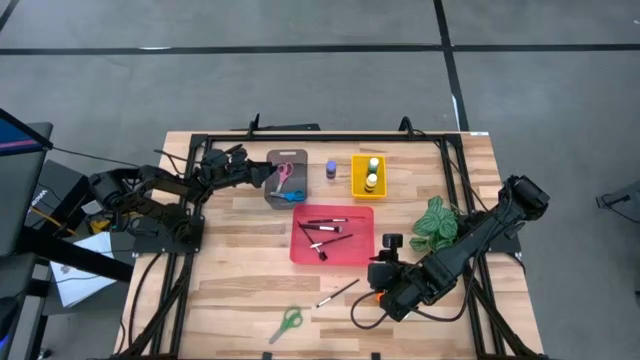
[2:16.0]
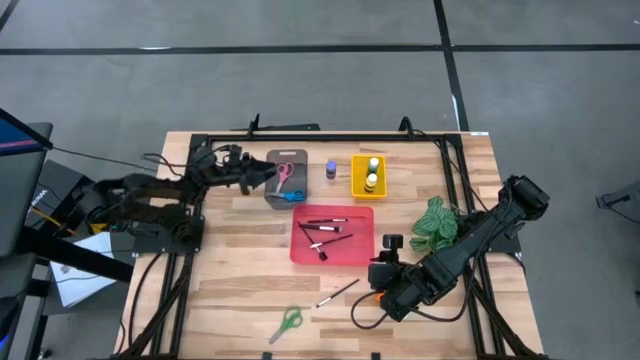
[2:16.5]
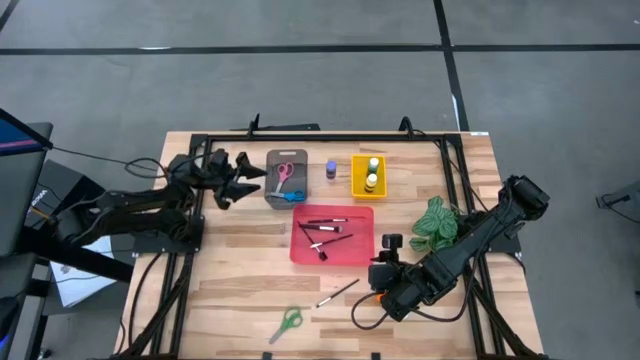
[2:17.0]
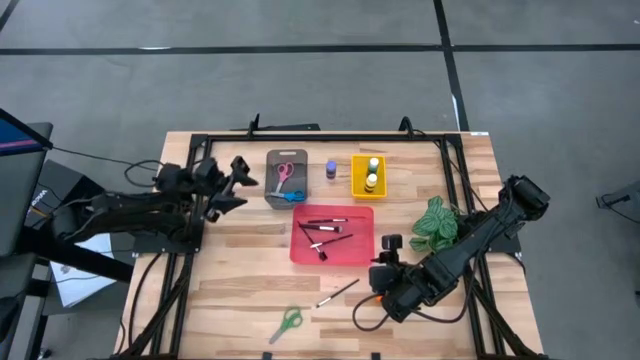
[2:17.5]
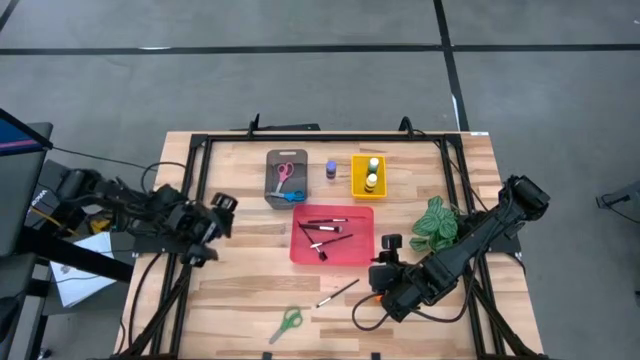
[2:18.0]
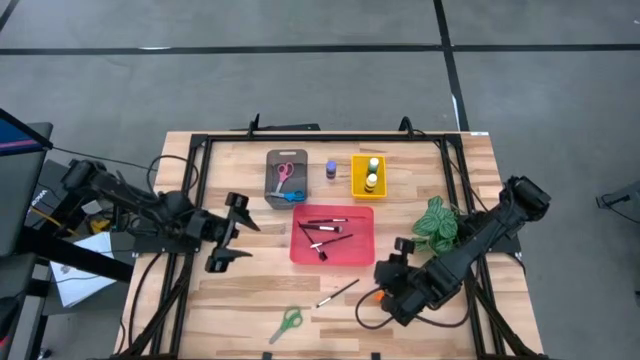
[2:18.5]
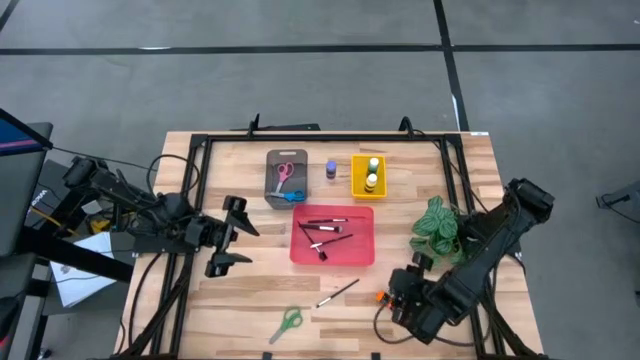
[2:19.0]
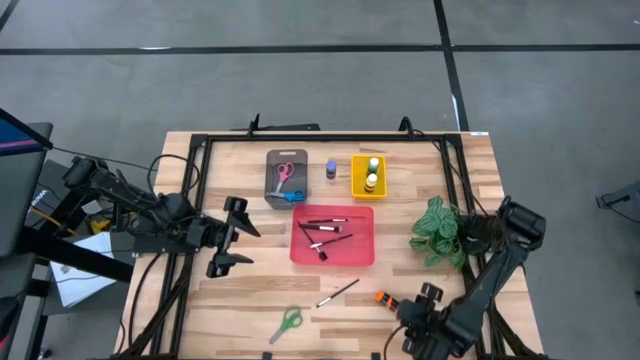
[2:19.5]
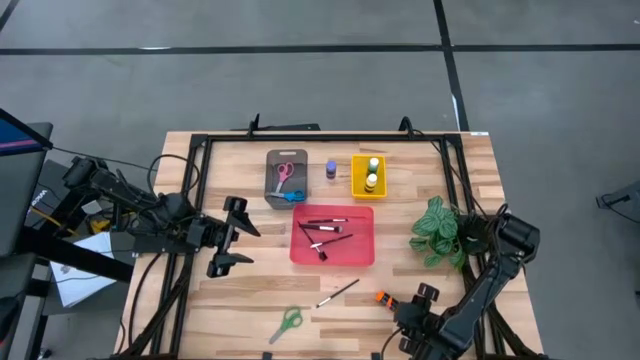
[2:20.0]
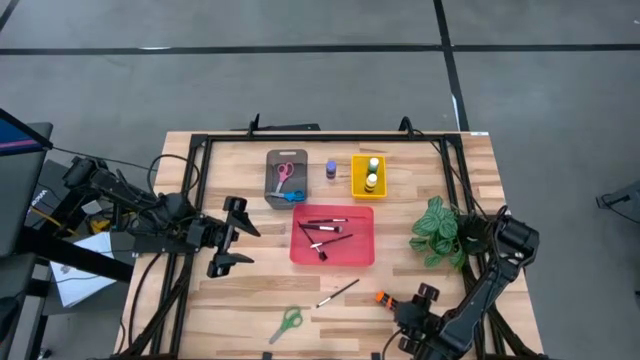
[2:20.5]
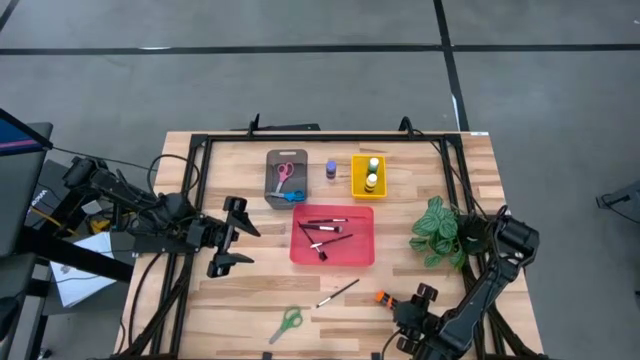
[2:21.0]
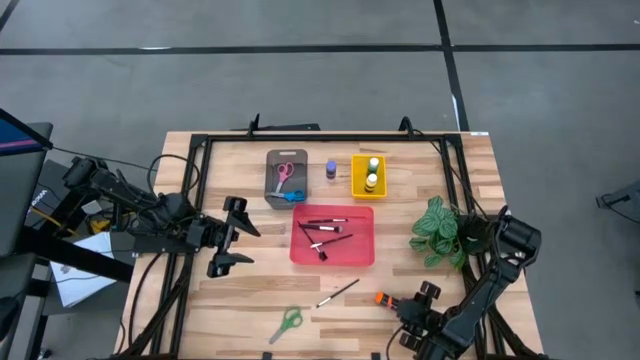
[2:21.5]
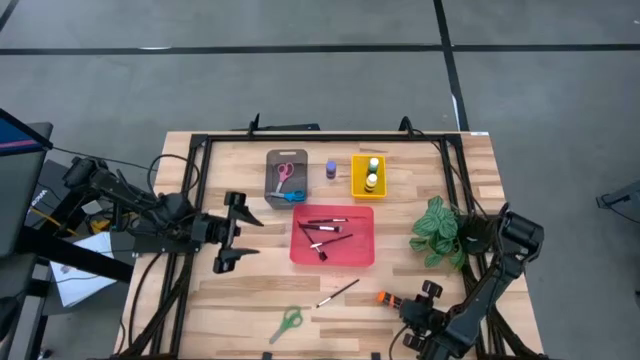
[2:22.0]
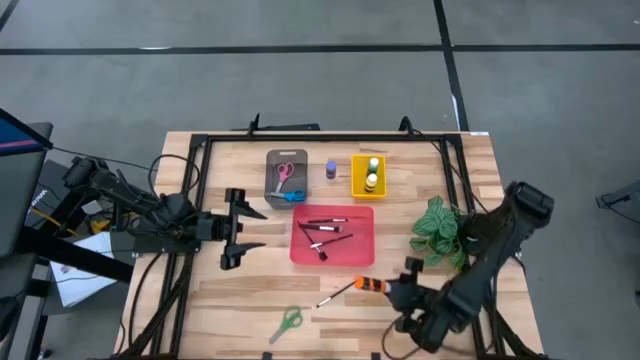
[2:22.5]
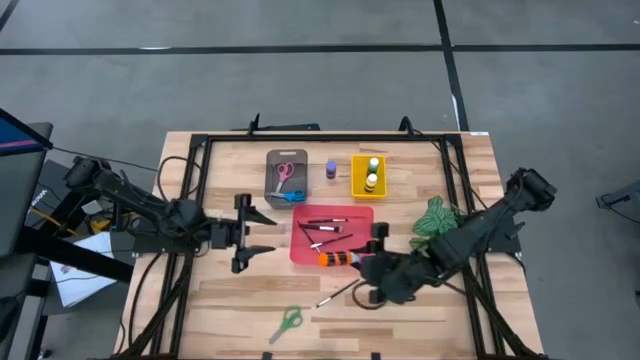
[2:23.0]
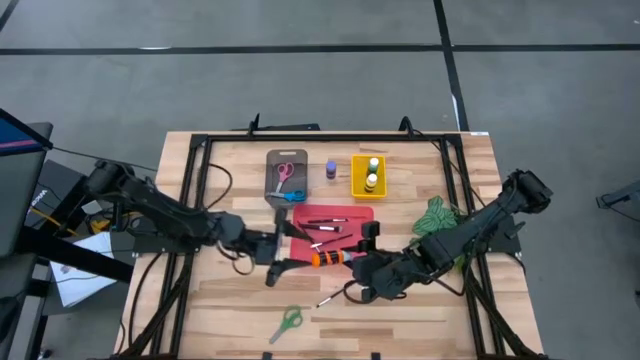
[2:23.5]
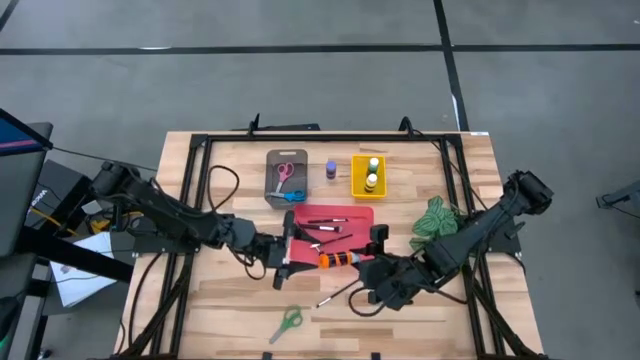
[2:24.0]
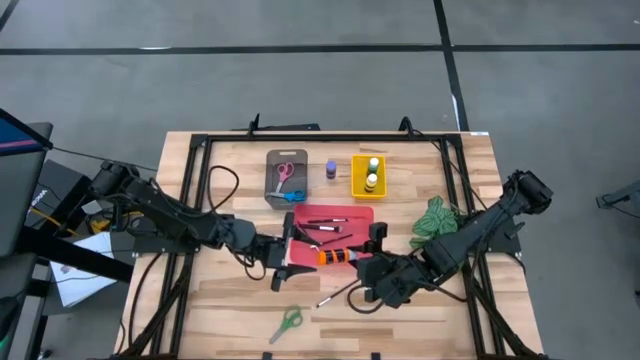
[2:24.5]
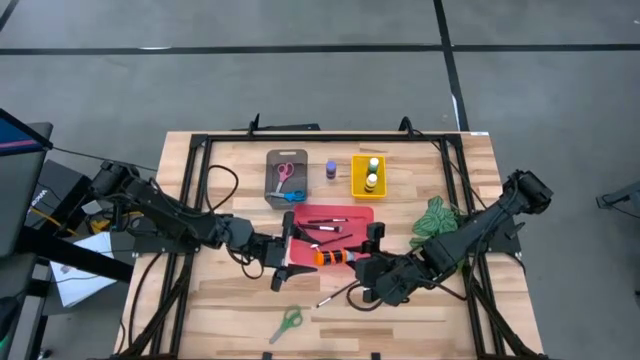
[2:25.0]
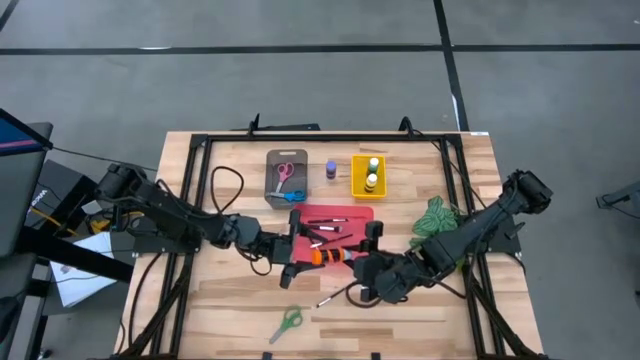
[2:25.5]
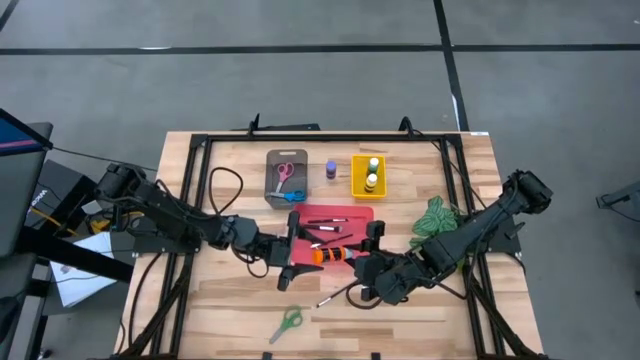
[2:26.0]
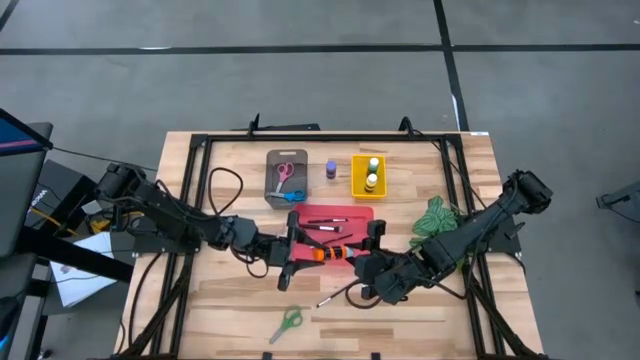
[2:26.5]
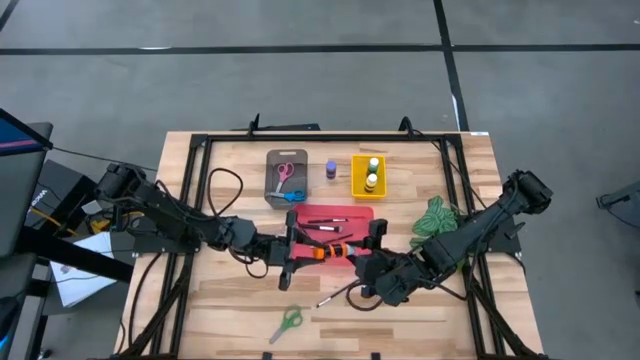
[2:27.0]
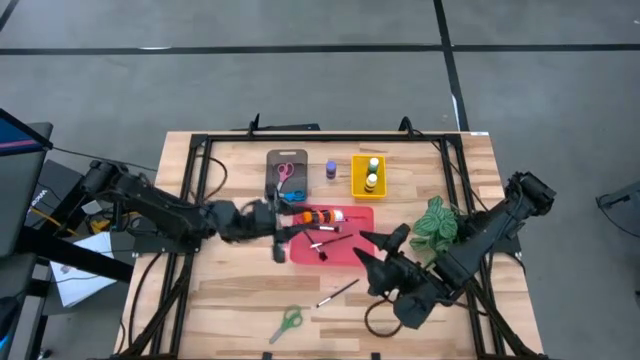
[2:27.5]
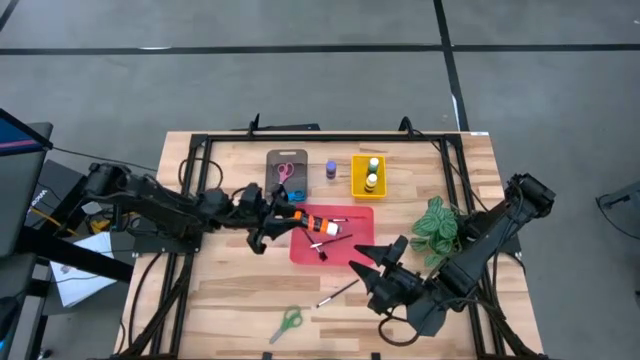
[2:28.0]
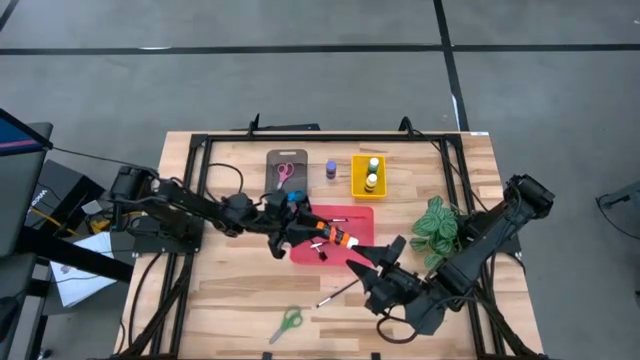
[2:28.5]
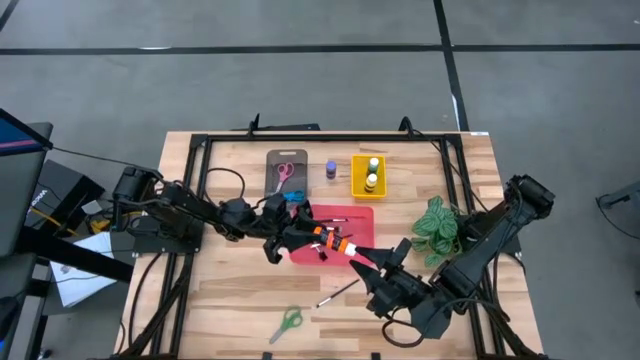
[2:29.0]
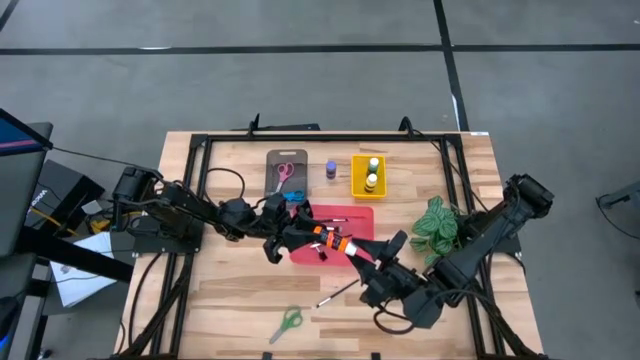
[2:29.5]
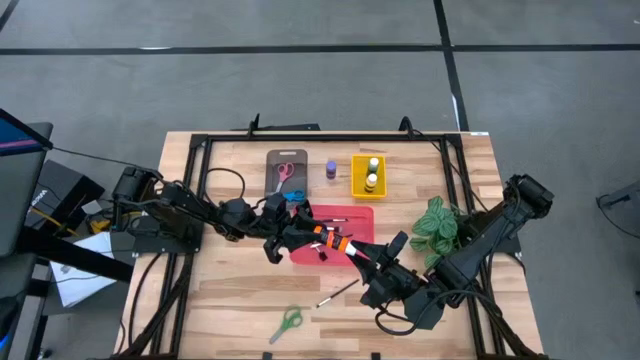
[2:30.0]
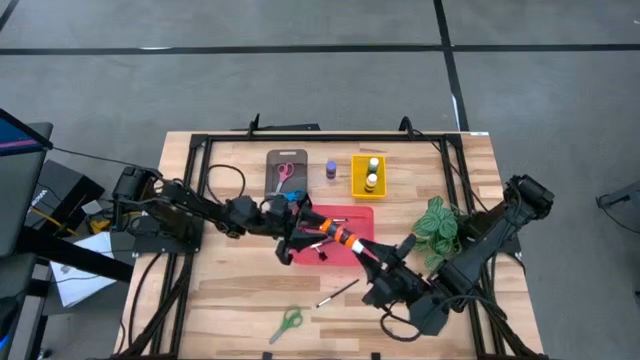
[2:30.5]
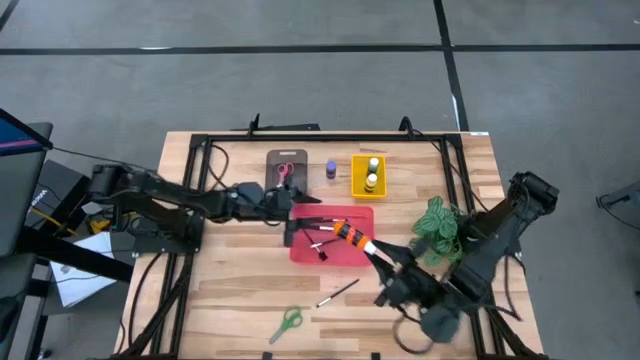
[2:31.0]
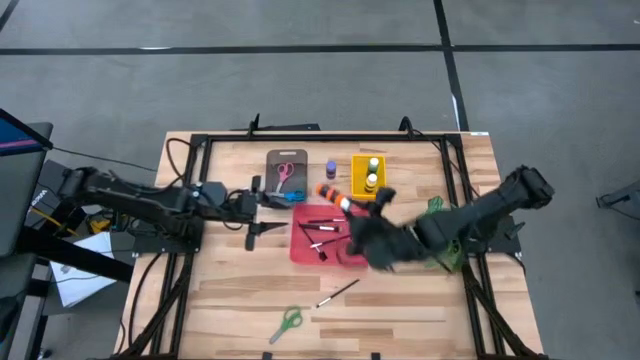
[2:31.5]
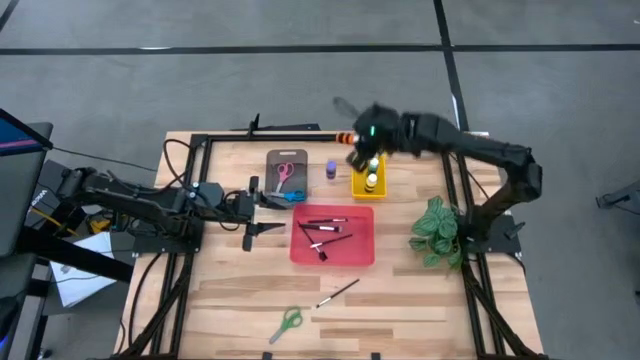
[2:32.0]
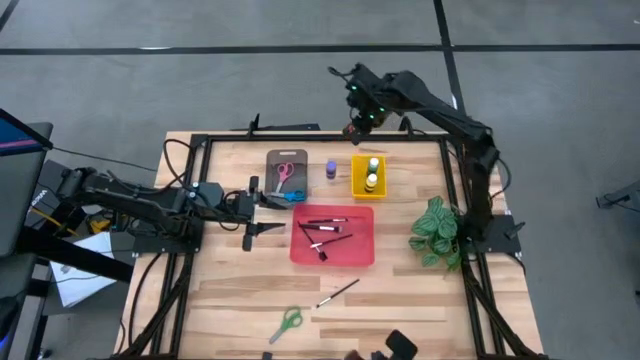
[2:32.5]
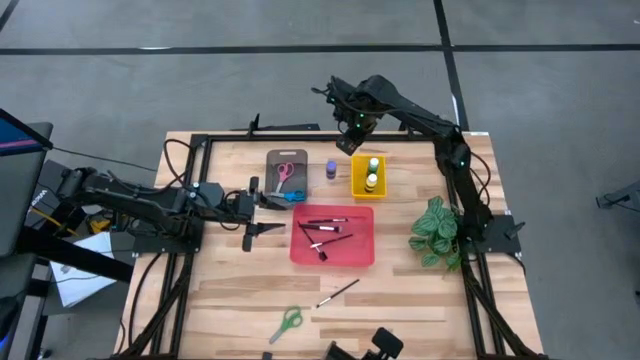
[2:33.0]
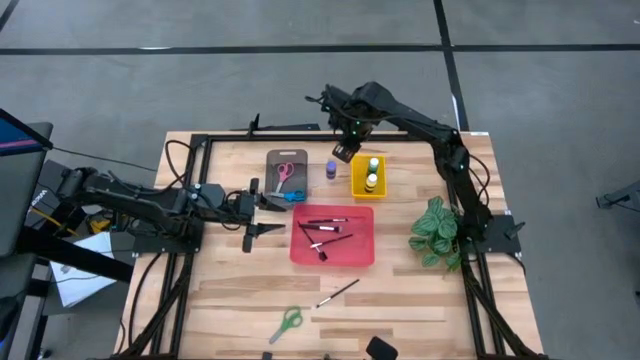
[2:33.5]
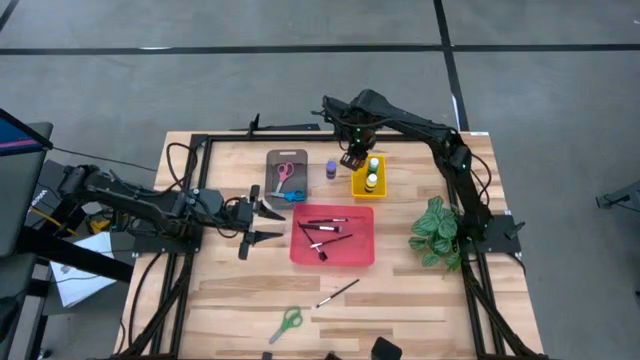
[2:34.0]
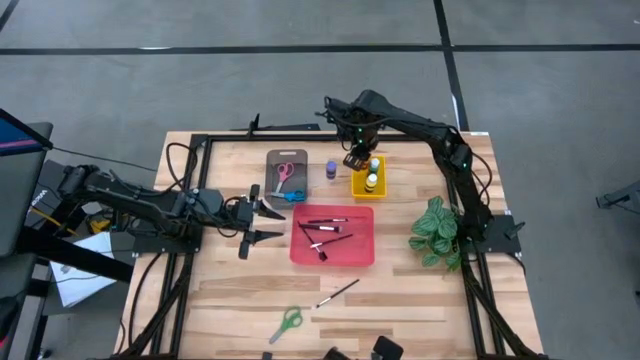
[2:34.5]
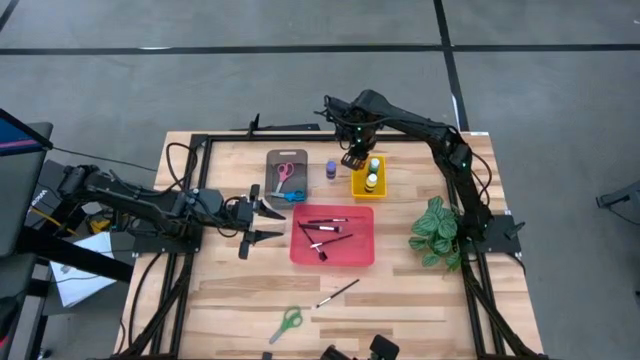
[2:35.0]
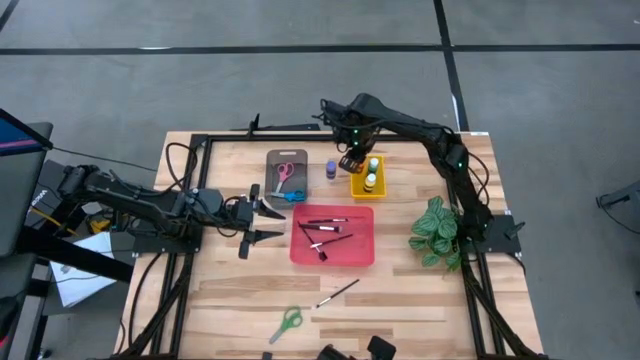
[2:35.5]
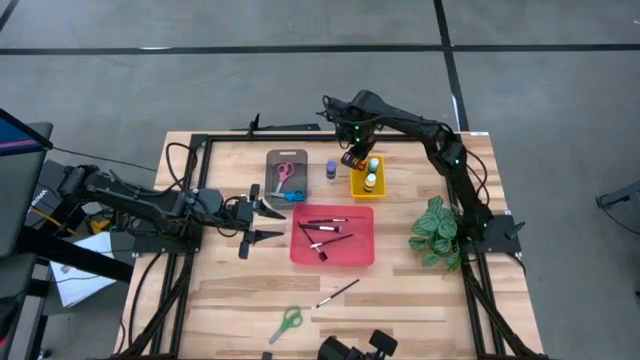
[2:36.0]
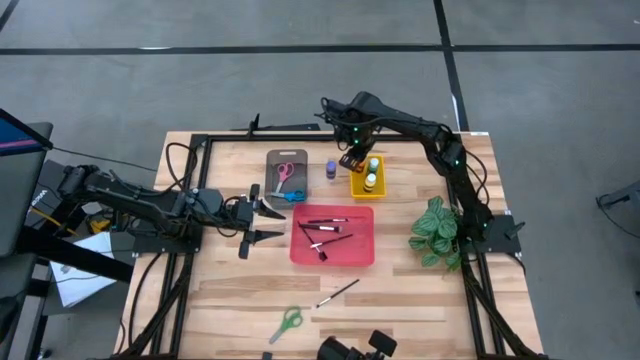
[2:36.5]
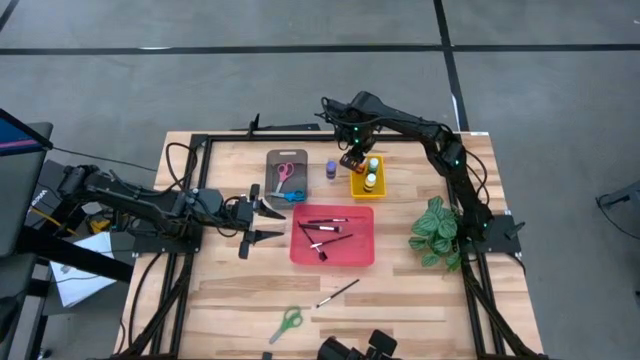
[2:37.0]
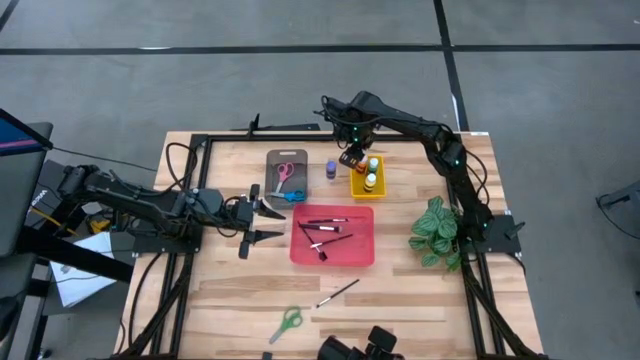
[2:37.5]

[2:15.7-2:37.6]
Task: Pick & Place Paint Supplies
Put the orange paint bottle into the yellow bin
